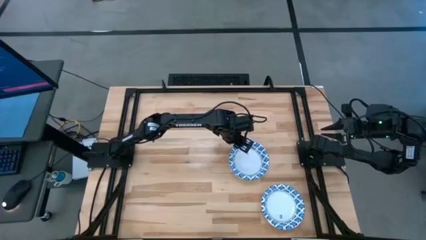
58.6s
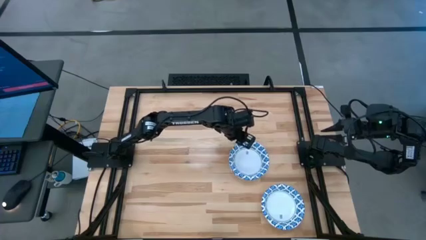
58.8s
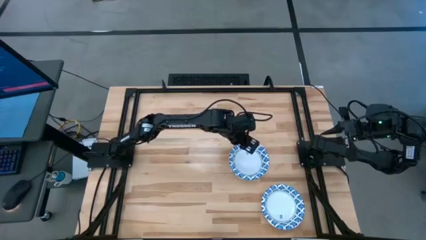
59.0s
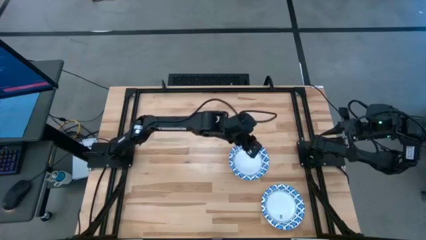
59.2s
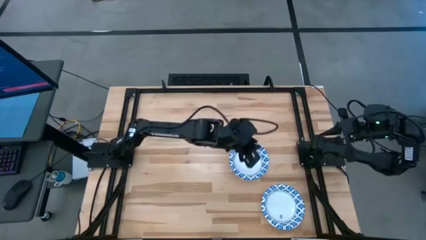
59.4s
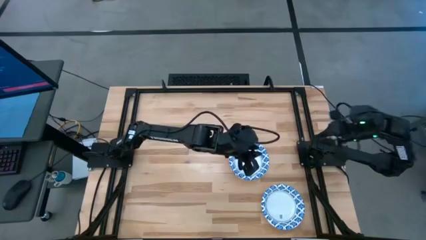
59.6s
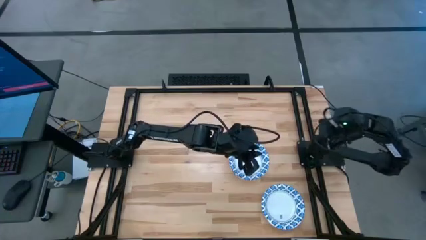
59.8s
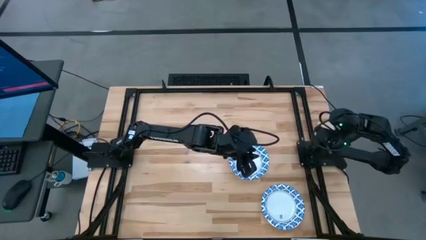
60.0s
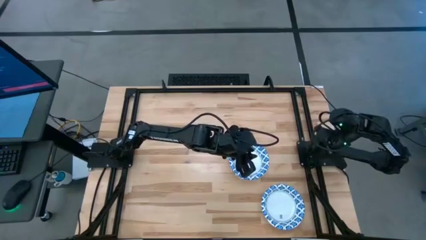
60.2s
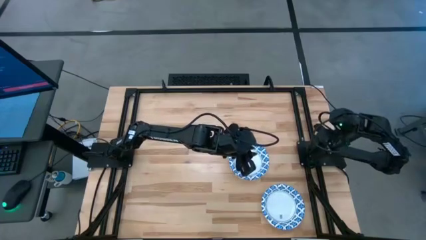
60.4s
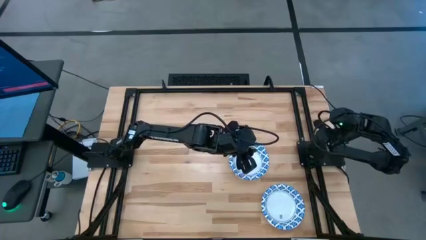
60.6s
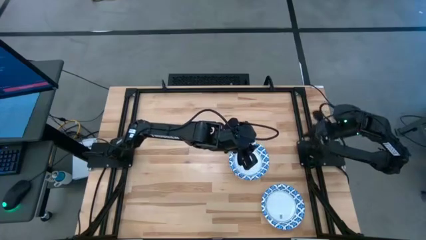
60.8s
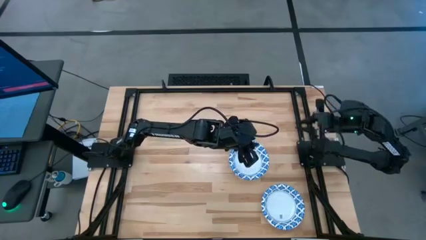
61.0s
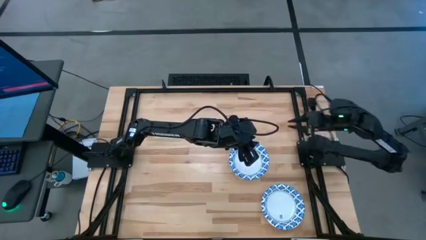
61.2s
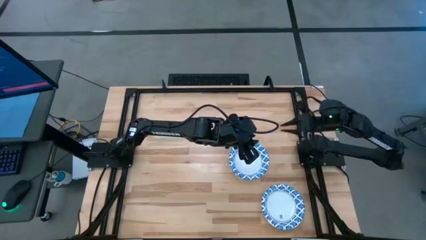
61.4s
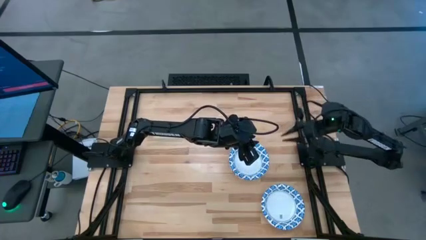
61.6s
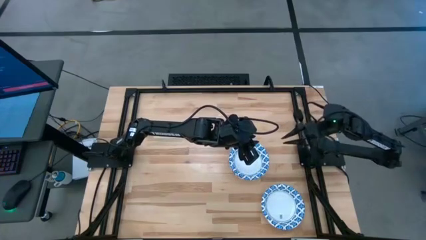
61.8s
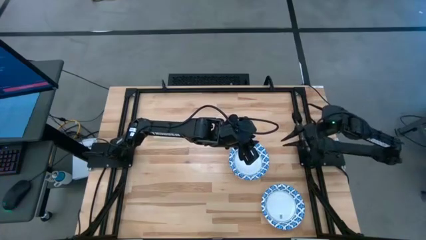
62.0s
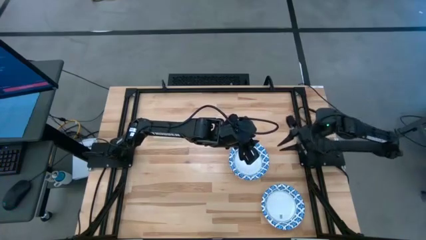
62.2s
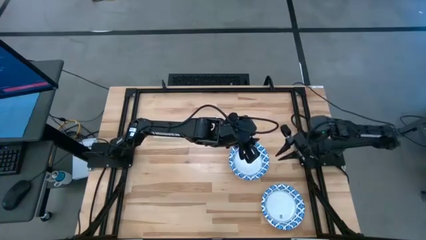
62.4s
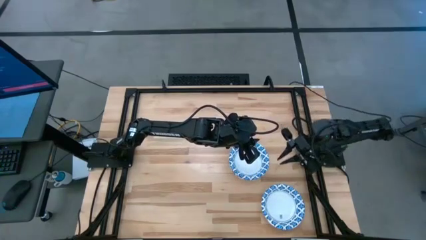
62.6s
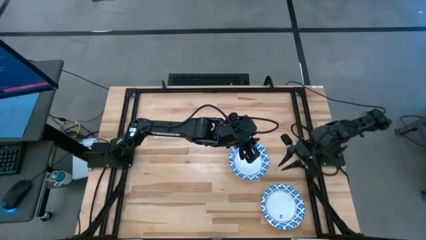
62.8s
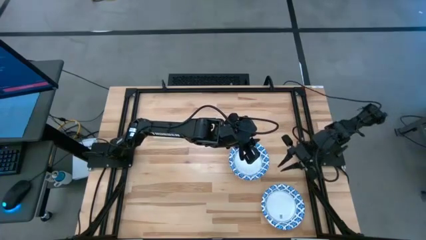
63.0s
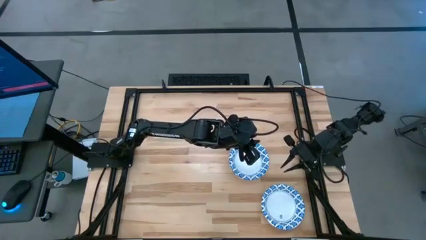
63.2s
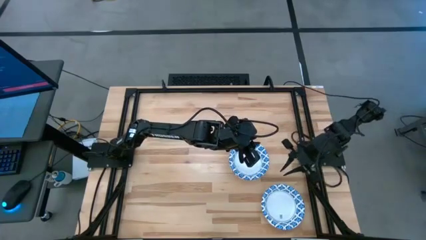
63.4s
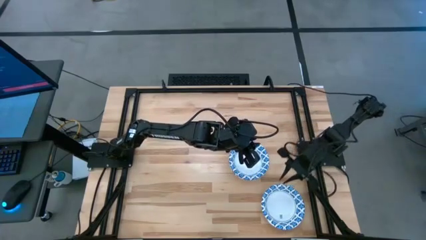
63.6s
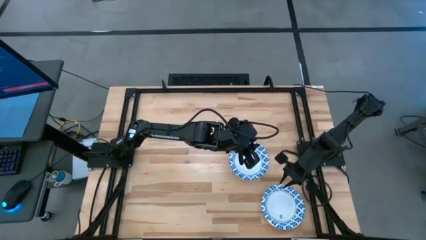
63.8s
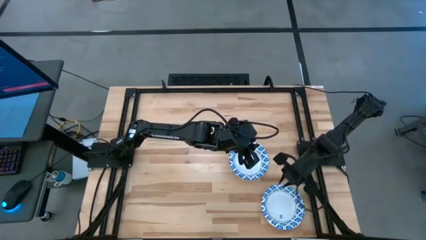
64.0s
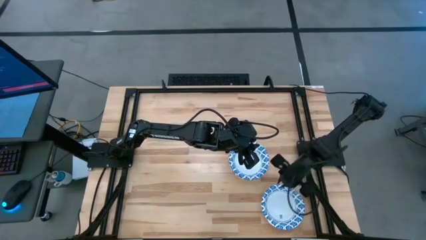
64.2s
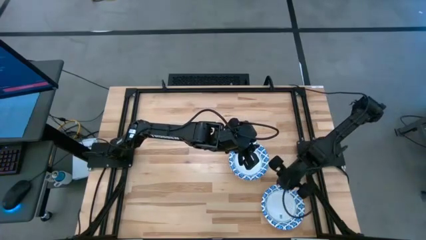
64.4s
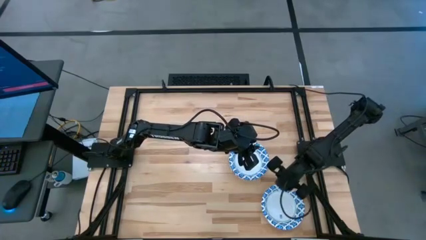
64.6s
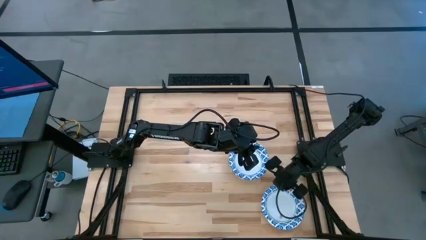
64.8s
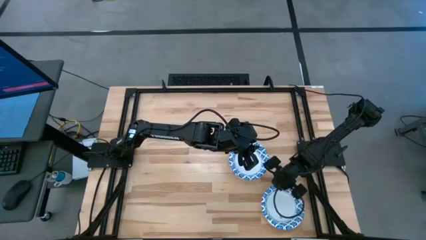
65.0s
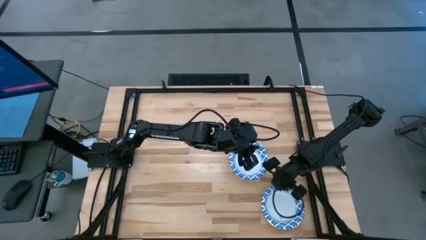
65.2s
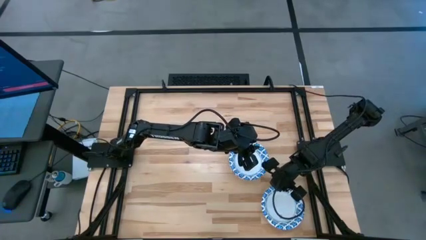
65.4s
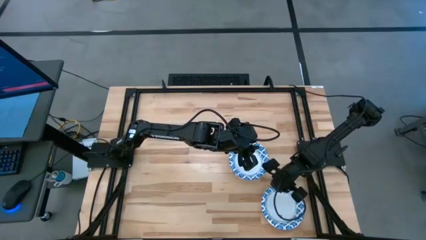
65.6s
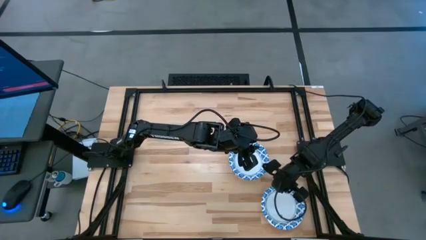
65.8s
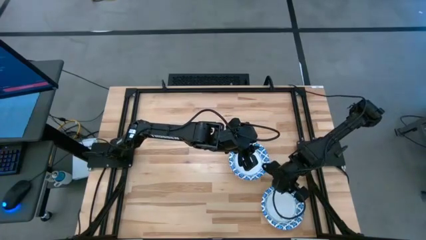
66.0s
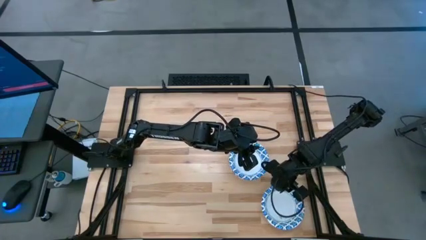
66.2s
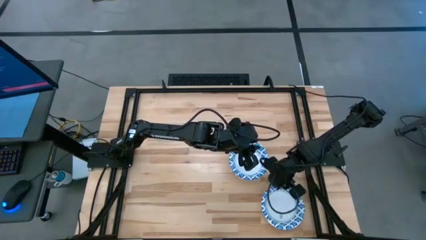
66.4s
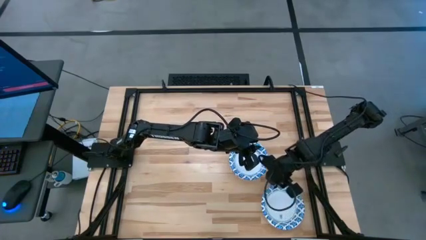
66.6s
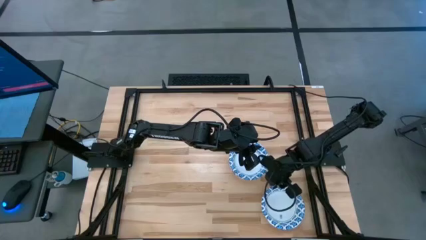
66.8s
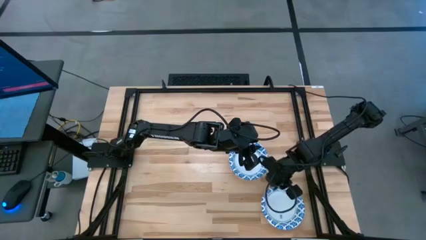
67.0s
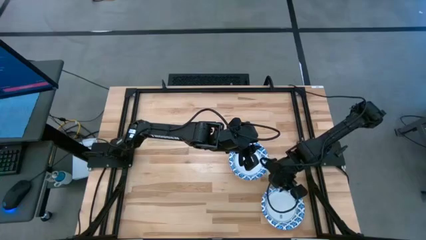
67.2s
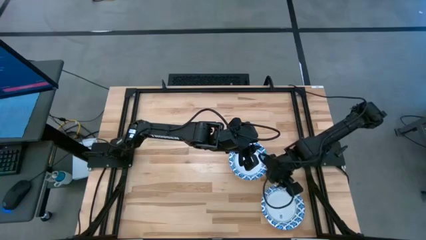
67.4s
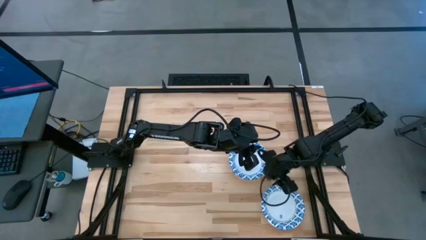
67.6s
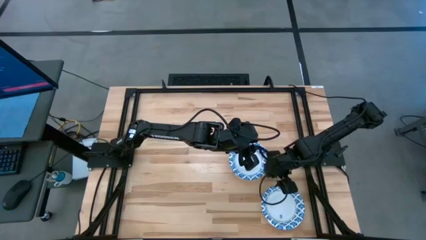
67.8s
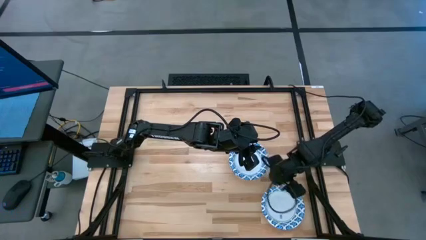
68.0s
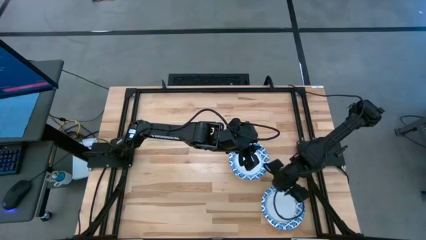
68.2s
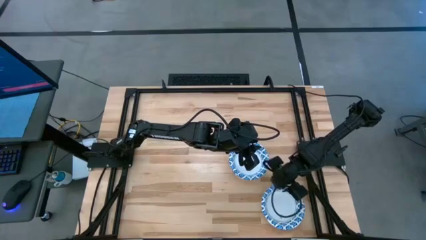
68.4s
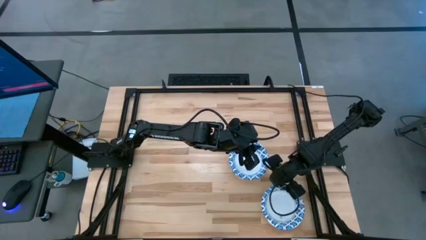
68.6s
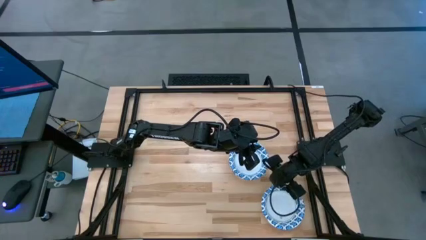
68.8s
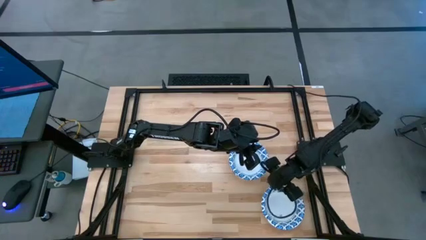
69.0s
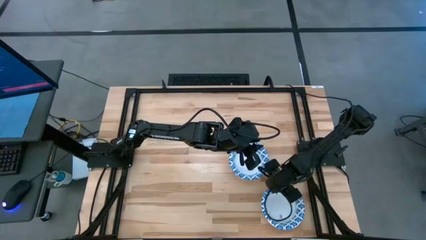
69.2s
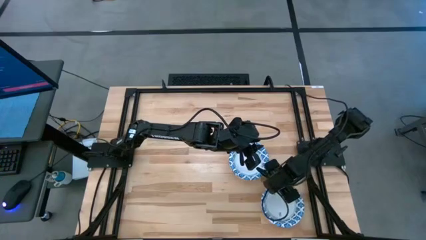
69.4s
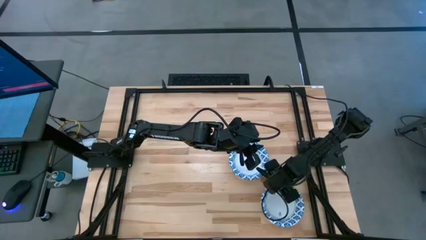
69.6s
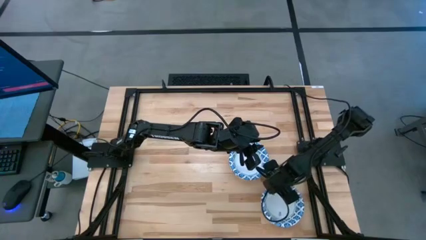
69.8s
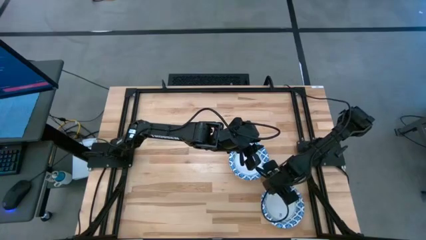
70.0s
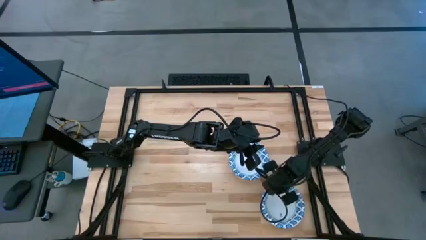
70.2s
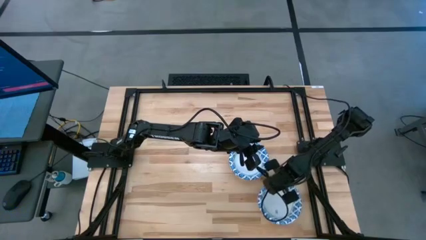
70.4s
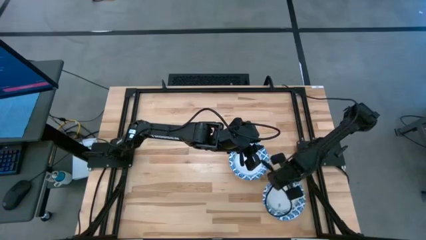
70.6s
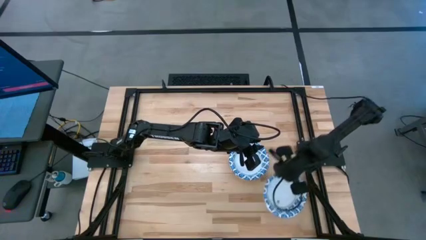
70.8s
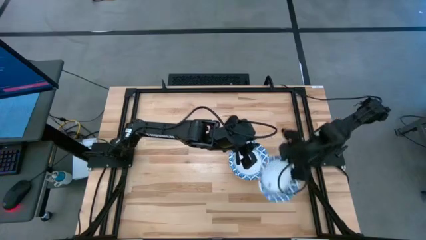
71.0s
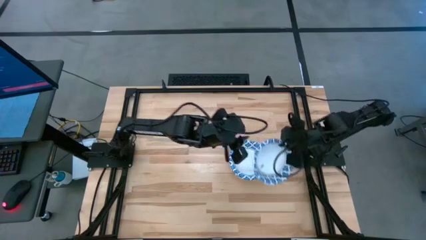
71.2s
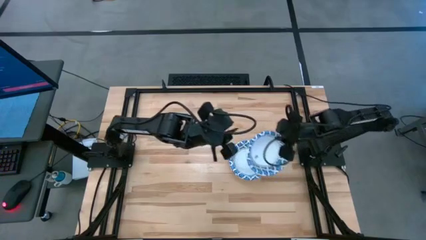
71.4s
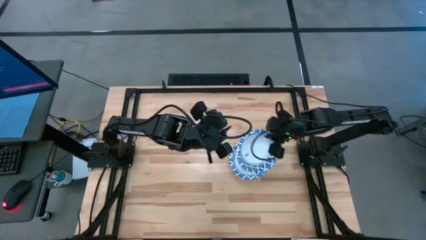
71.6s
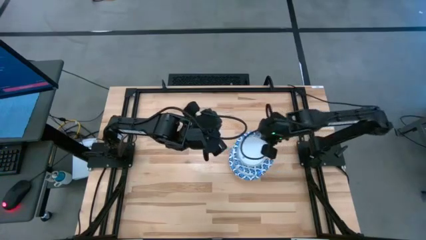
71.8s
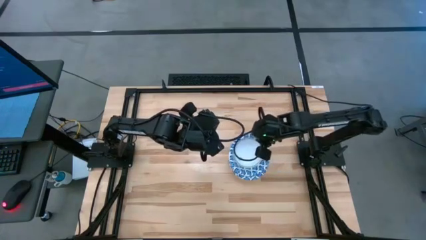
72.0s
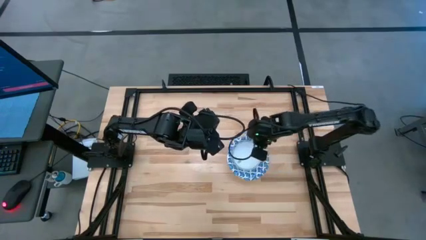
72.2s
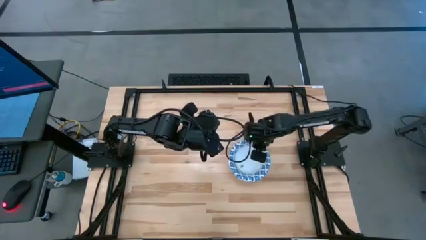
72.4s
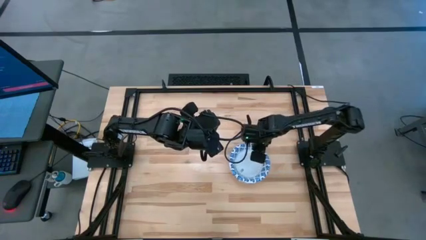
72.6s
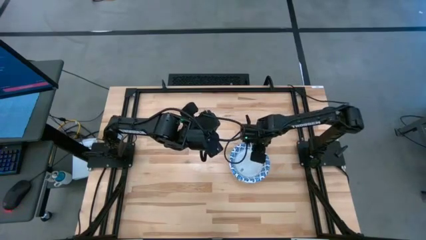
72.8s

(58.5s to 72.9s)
Task: Nest bowls inside each other
Stack the white bowl on top of the other white bowl
